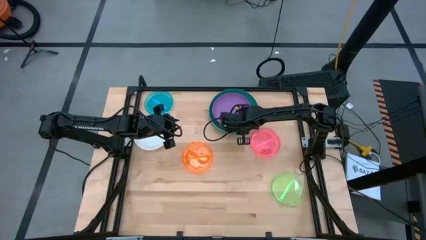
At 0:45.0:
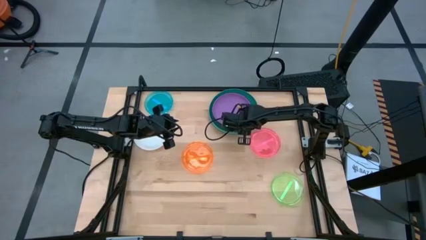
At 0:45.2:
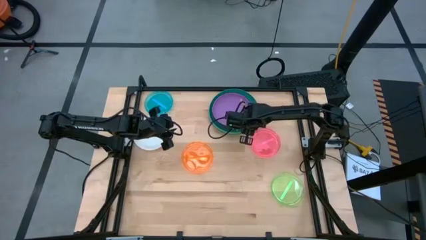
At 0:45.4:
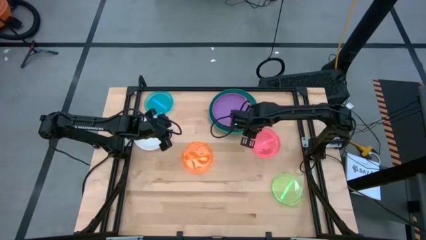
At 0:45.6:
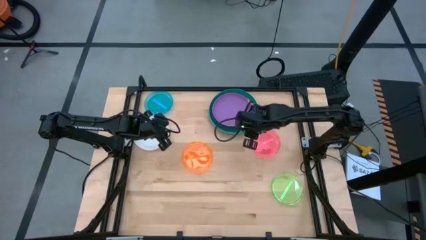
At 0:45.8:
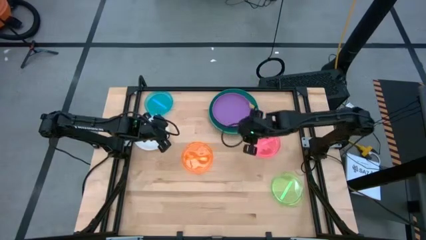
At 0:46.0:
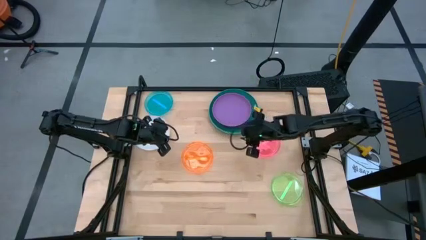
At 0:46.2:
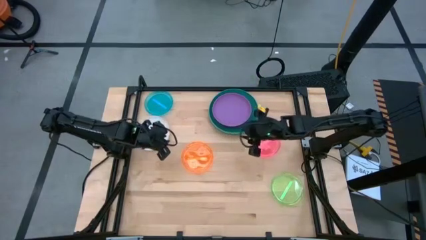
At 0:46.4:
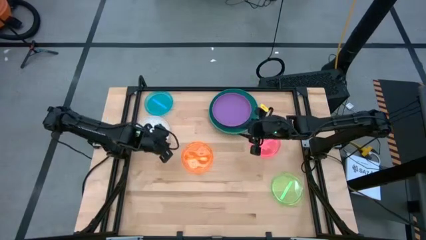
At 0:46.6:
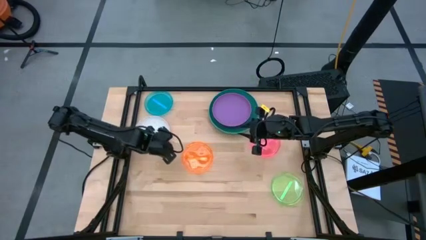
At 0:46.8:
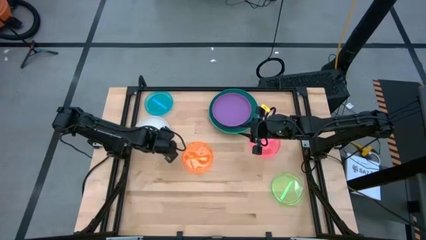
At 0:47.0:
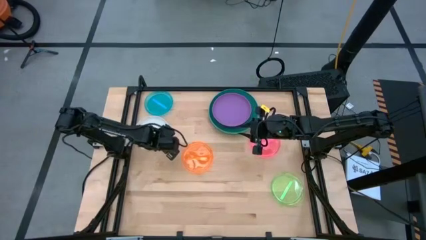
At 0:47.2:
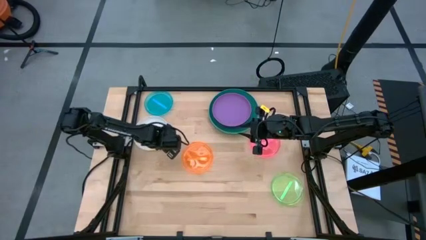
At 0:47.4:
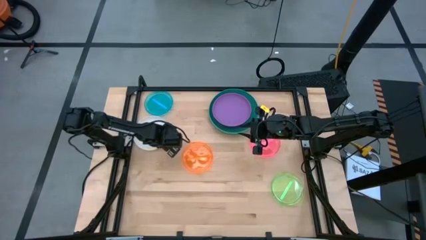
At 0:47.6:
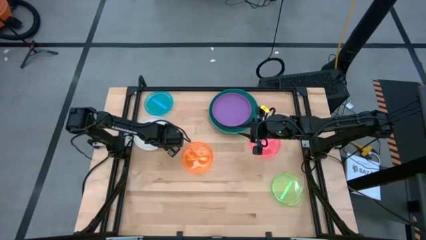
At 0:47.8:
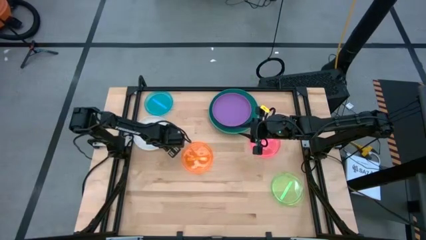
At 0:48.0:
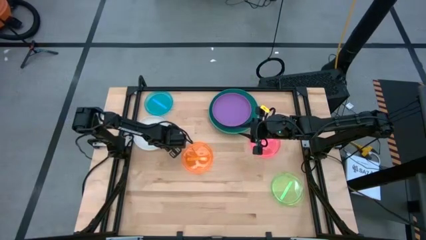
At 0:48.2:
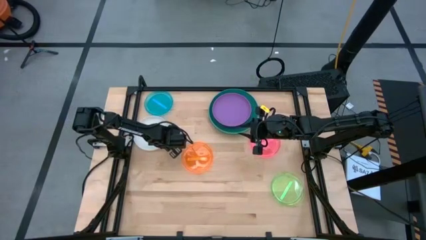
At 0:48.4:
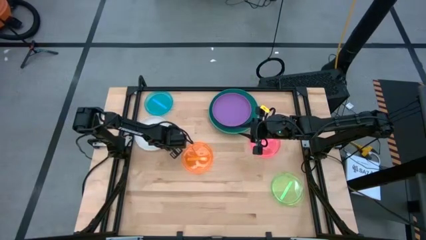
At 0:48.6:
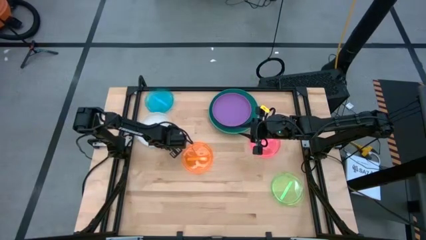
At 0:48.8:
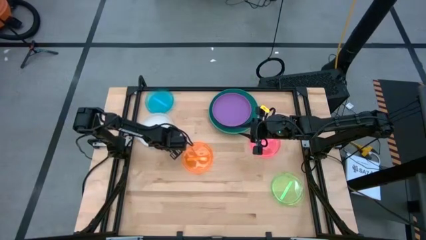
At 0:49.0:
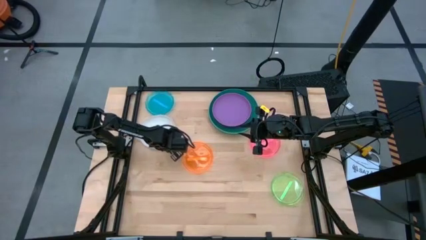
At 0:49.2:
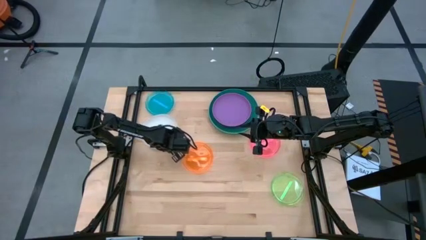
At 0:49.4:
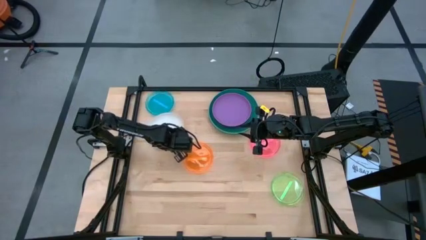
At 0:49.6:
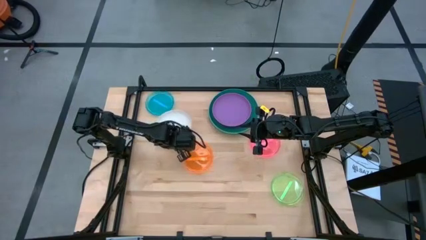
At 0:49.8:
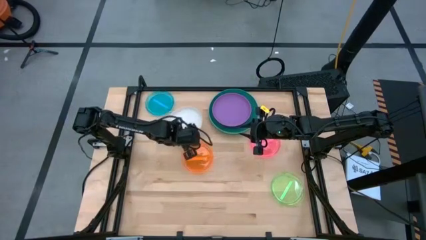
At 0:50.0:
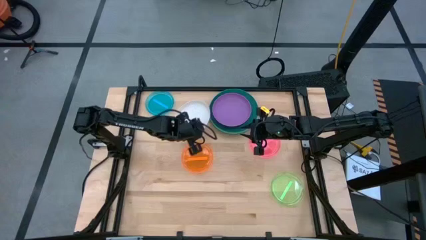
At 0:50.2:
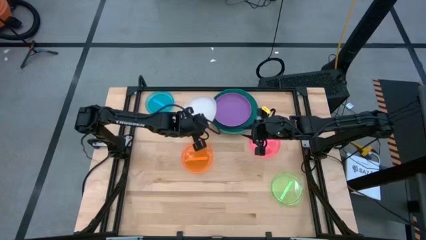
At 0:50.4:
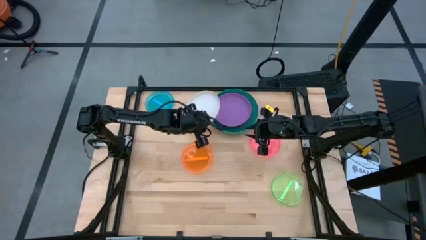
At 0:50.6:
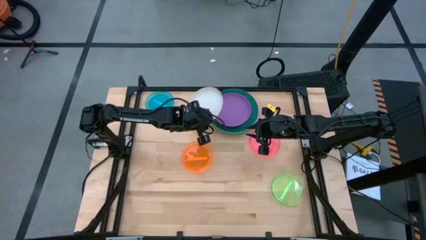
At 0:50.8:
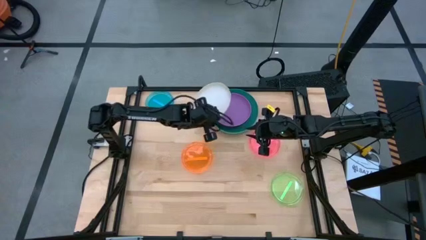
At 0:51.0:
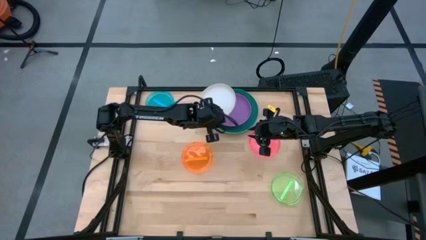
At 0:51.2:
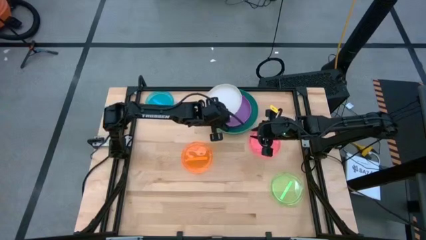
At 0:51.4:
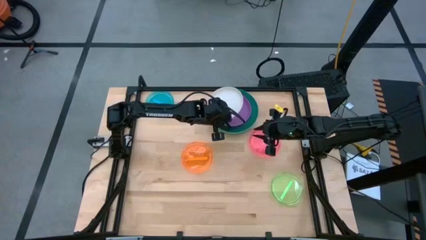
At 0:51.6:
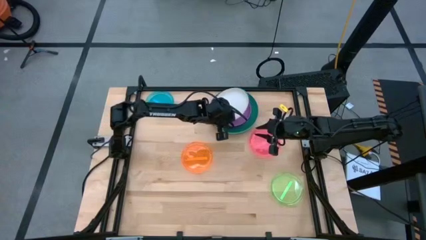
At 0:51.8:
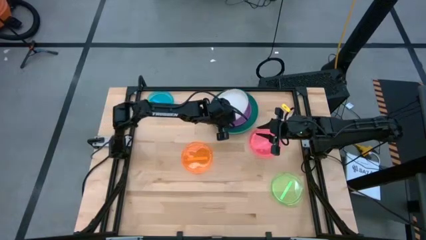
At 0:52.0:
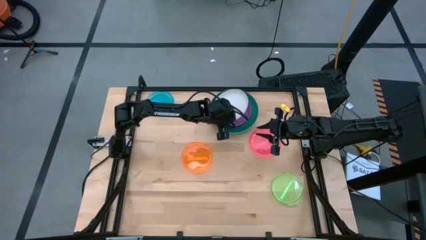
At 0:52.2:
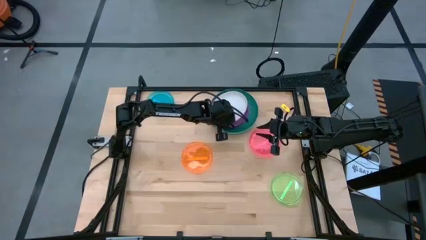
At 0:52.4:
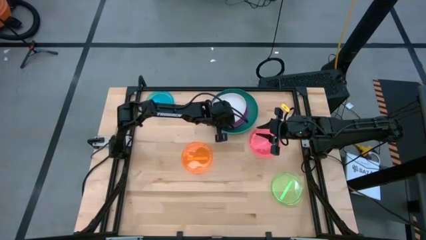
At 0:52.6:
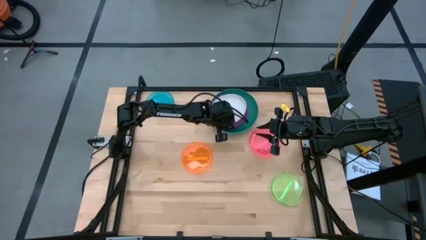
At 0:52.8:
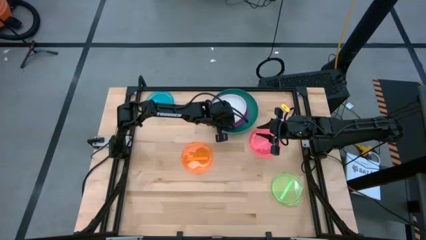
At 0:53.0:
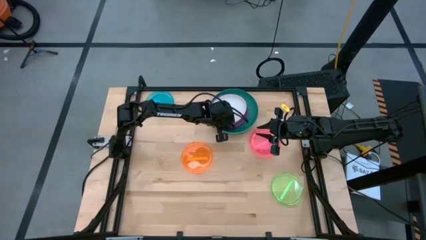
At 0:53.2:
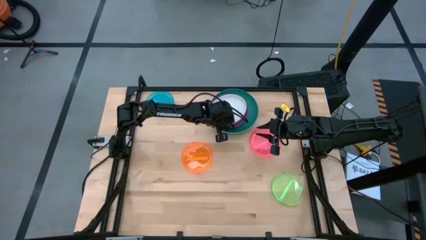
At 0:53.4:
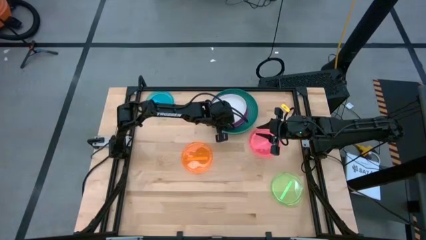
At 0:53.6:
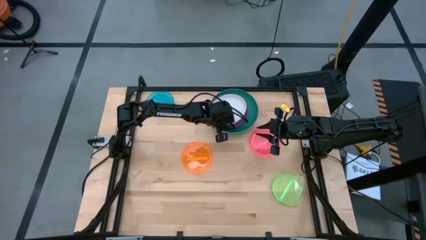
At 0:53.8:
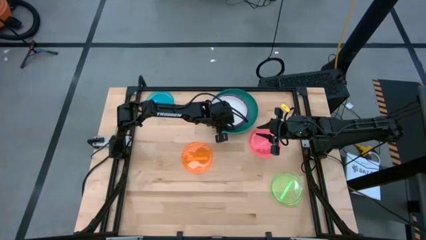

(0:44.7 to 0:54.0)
Task: Stack plastic plates
Stack the white plate on top of the purple plate

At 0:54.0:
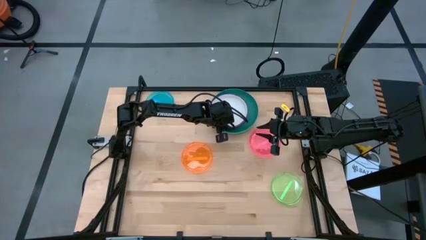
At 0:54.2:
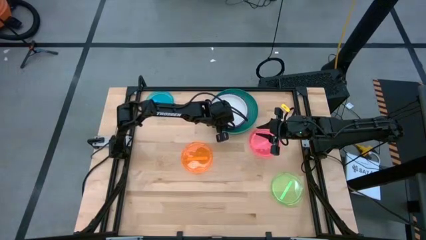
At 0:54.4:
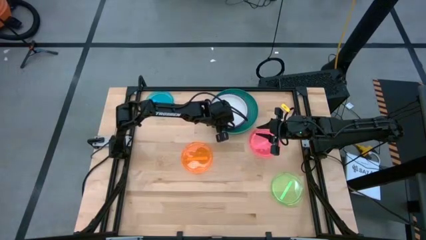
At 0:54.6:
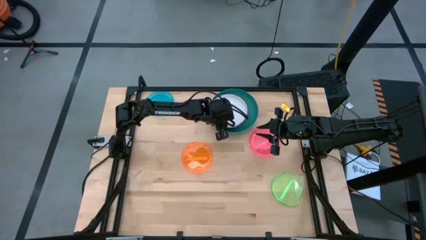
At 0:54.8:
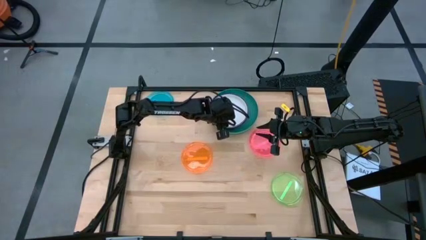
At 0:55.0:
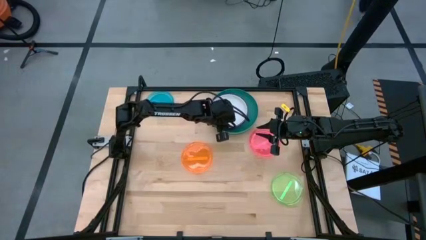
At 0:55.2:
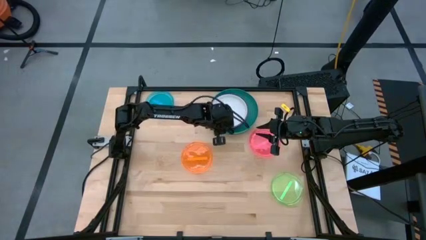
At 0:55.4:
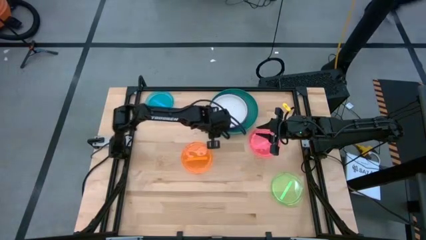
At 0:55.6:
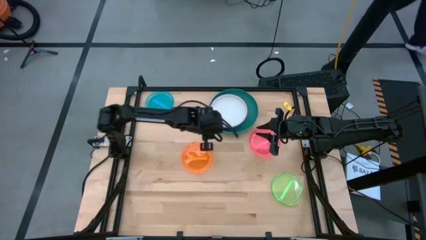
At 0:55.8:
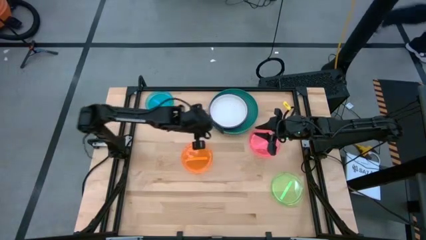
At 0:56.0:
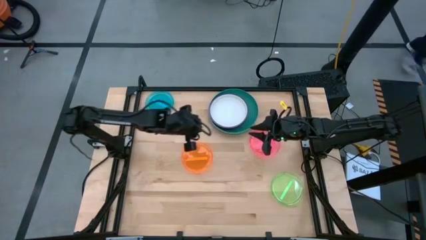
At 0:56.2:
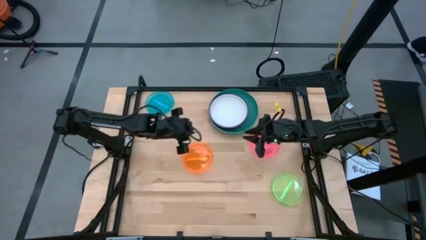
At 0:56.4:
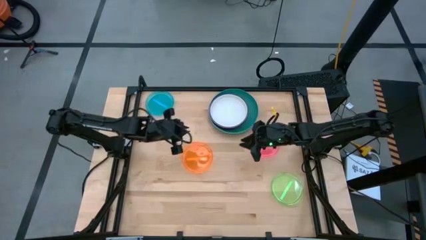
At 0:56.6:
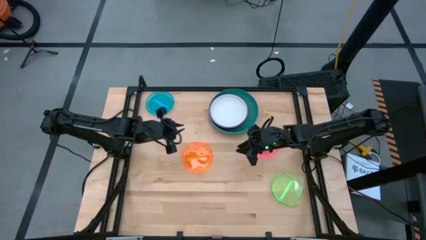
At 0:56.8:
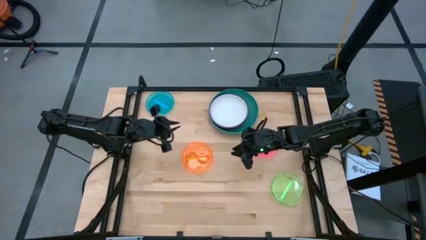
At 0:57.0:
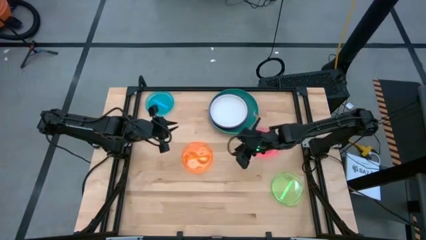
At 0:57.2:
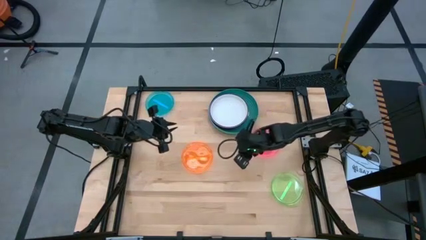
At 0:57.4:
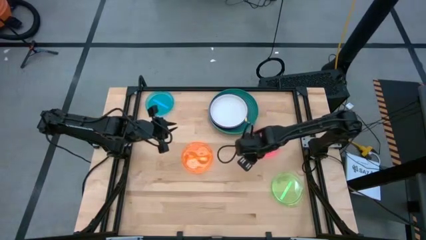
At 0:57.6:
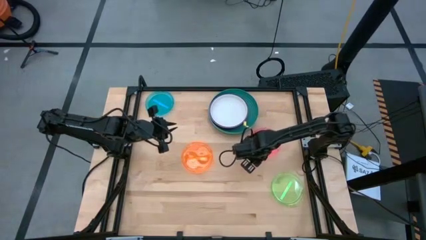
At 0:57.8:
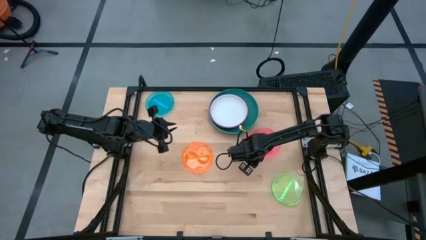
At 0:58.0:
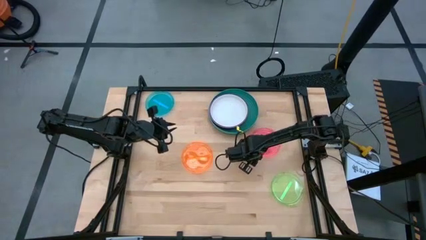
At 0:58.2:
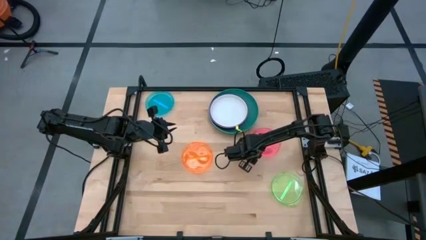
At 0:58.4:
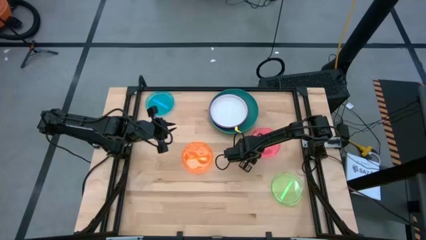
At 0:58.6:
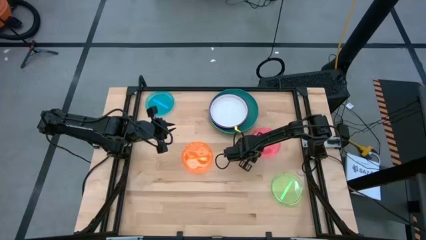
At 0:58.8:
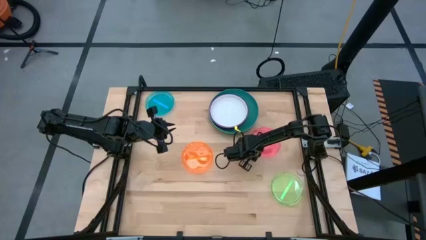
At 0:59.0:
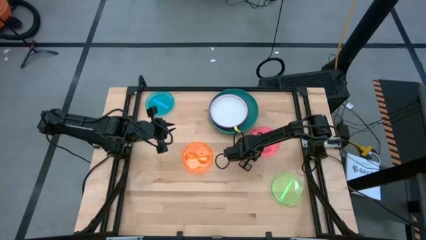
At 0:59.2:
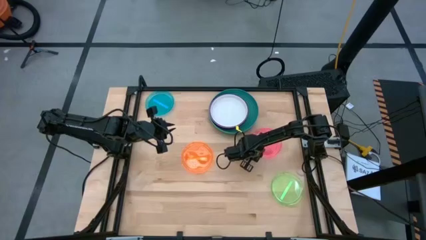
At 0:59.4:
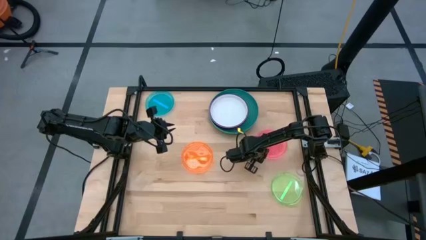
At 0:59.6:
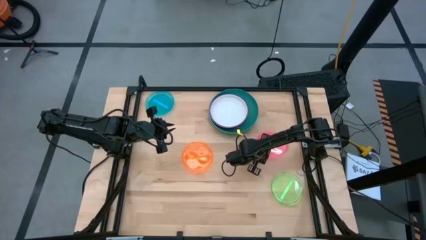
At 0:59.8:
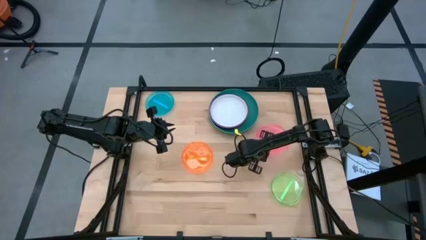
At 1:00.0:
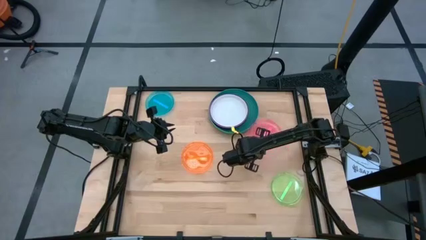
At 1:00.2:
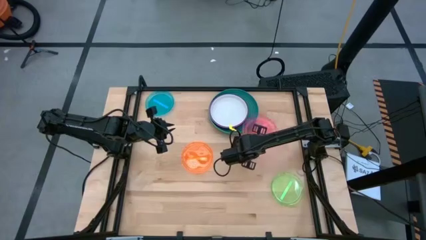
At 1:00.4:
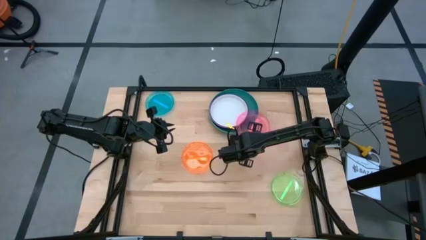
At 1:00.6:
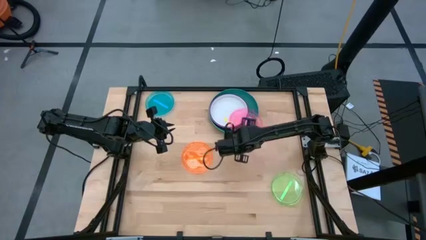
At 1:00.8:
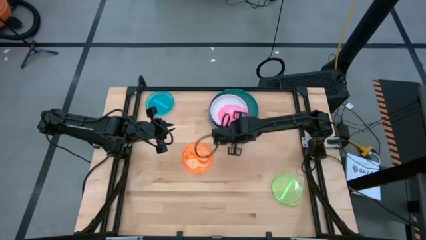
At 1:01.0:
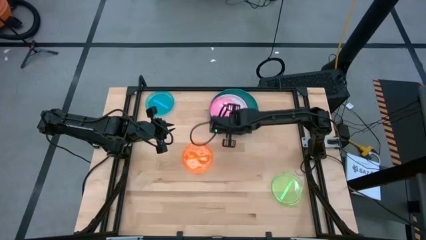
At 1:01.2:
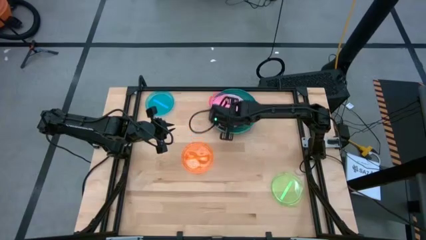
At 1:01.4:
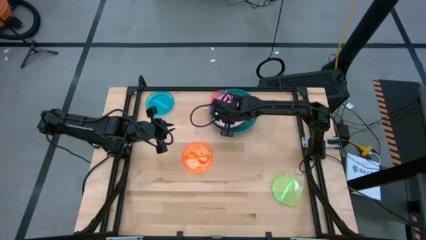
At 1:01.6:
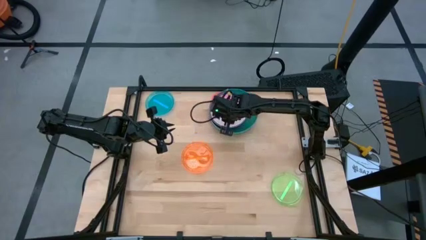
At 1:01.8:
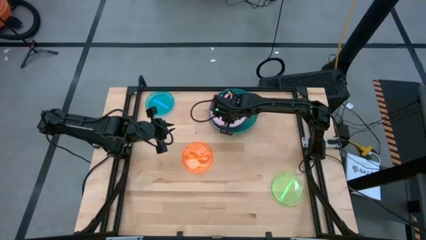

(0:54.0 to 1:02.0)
Stack the small pink plate on top of the white plate
